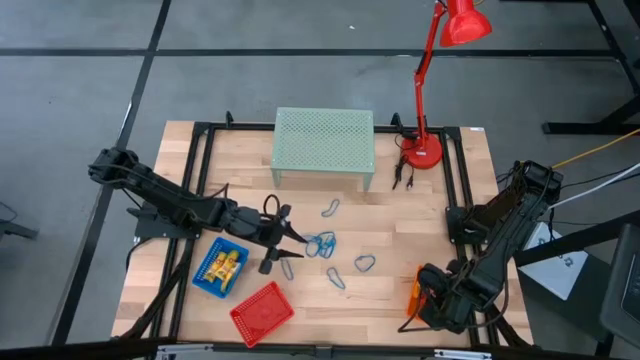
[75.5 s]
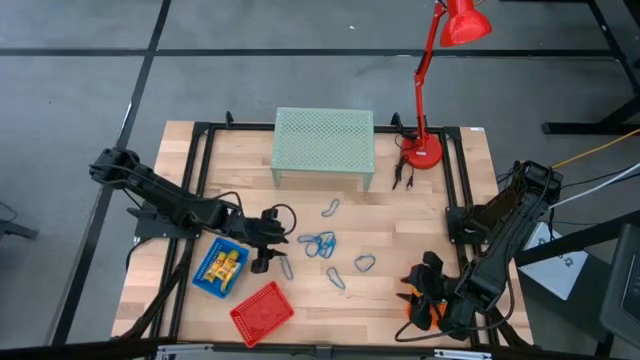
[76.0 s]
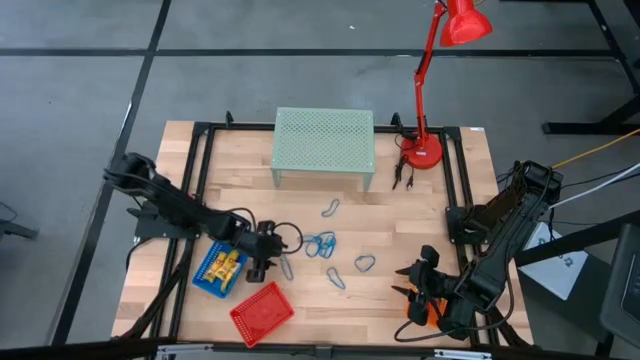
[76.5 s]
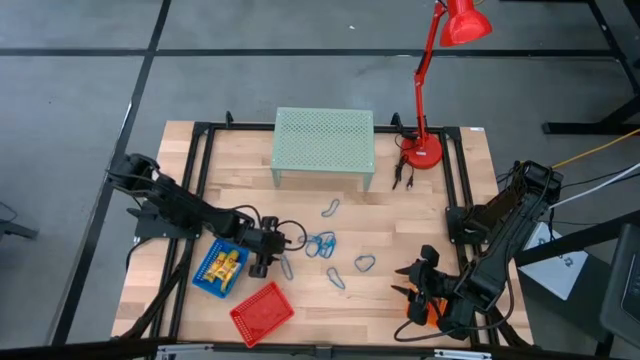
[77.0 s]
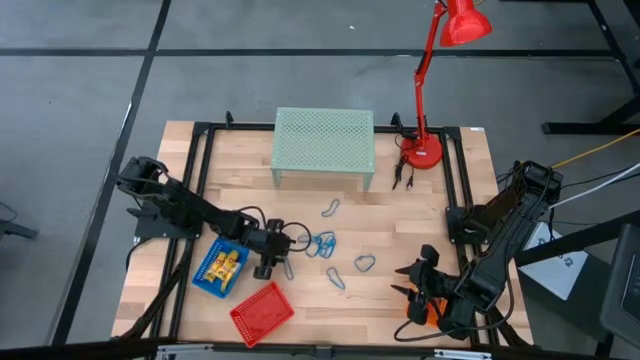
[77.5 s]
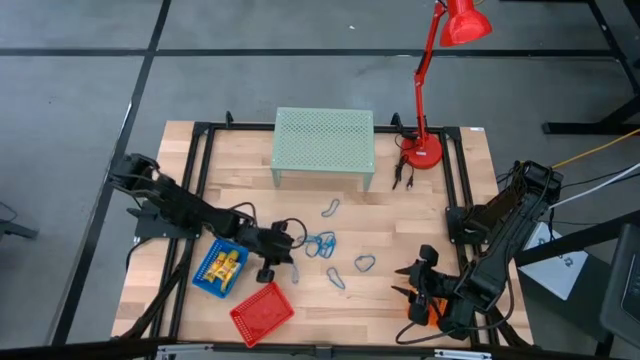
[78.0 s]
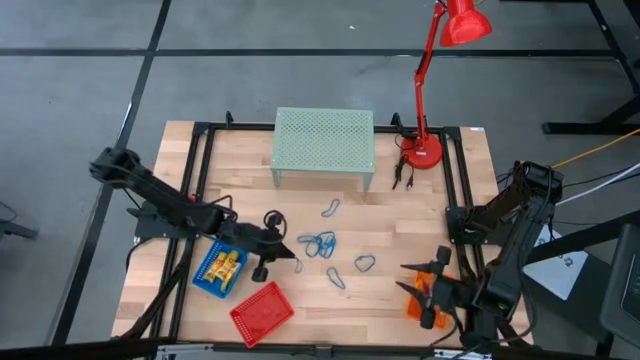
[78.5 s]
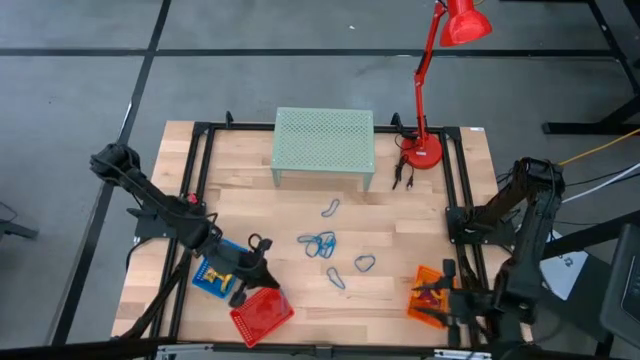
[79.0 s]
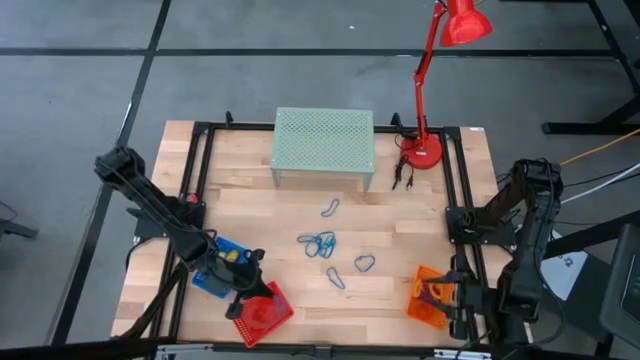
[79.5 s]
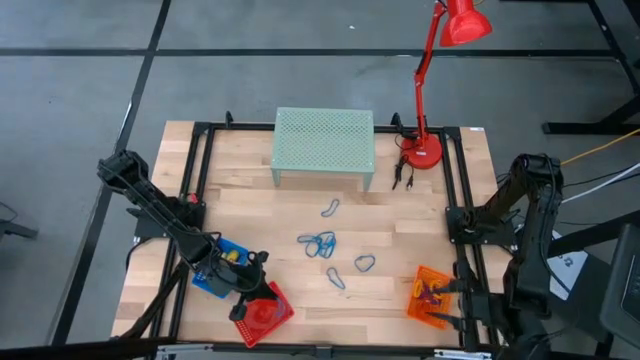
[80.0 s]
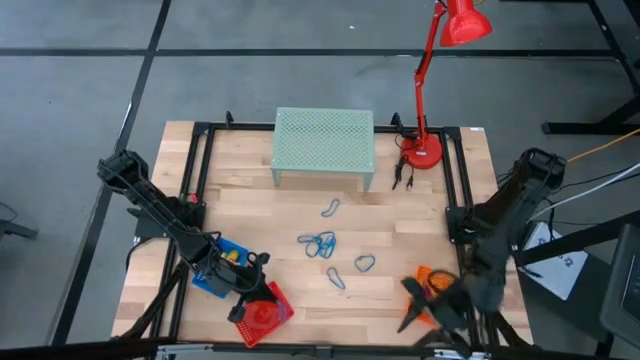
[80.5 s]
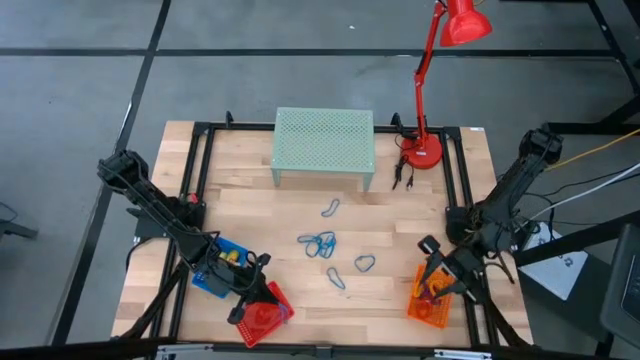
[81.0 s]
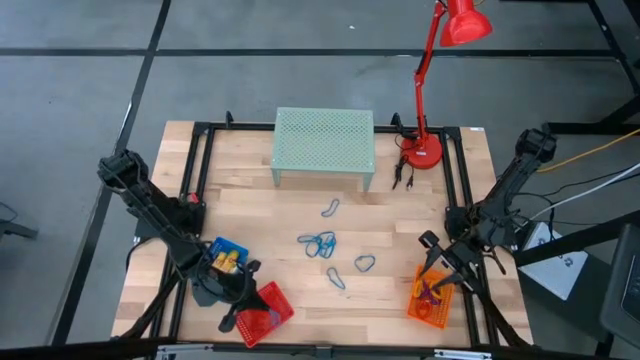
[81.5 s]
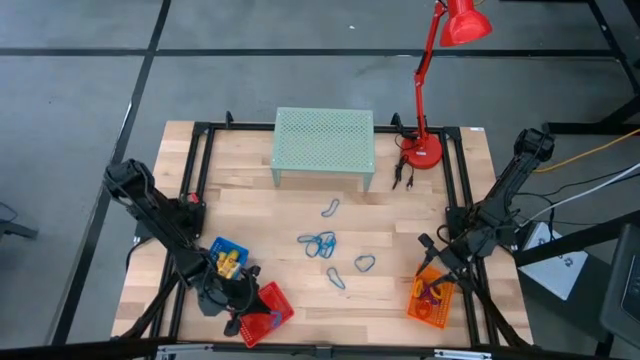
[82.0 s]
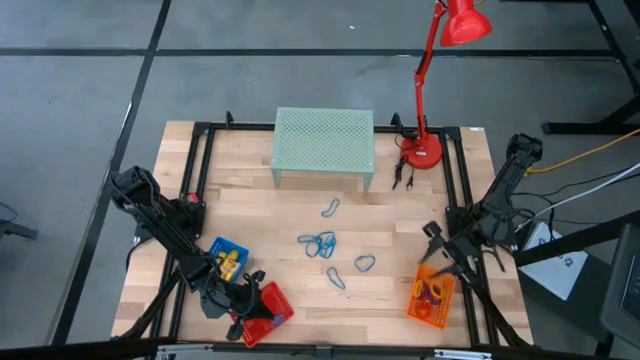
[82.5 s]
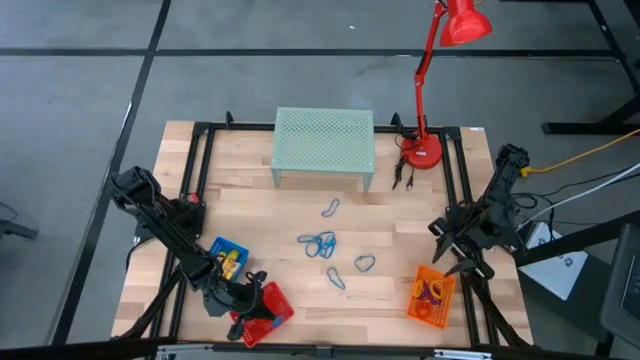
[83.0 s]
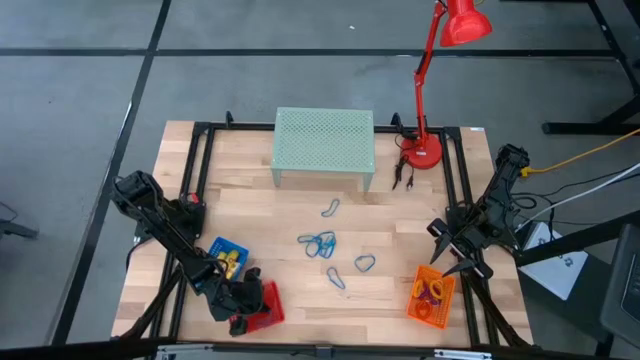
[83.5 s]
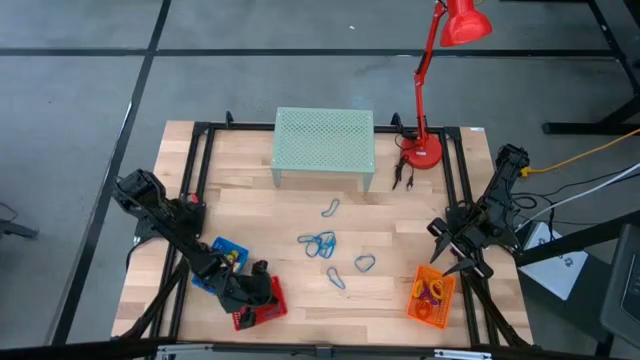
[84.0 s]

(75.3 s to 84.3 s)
Task: Pick & Place Office Desk Supplies
Put the blue rubber band into the red bin

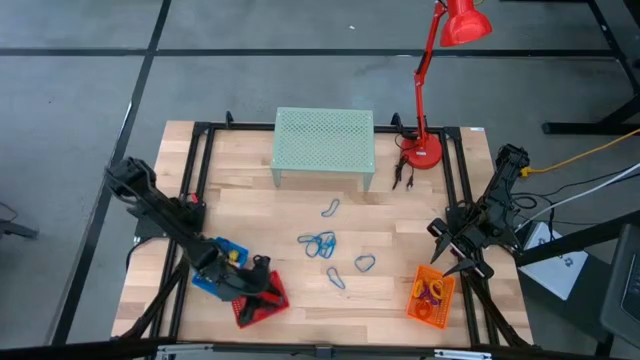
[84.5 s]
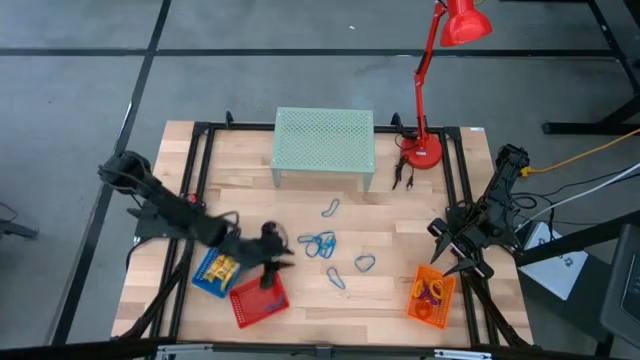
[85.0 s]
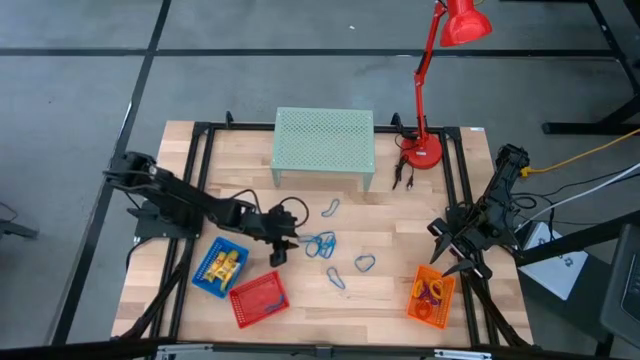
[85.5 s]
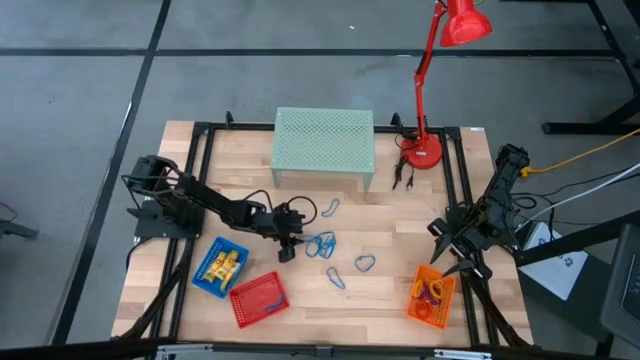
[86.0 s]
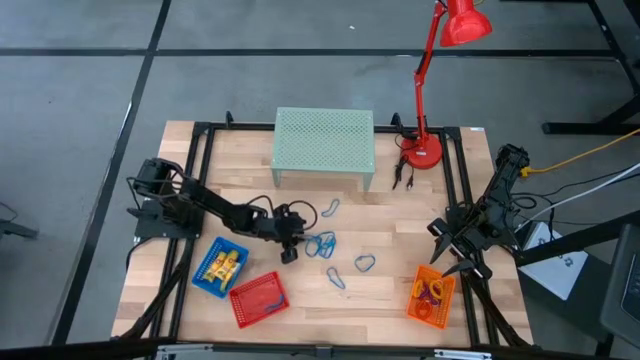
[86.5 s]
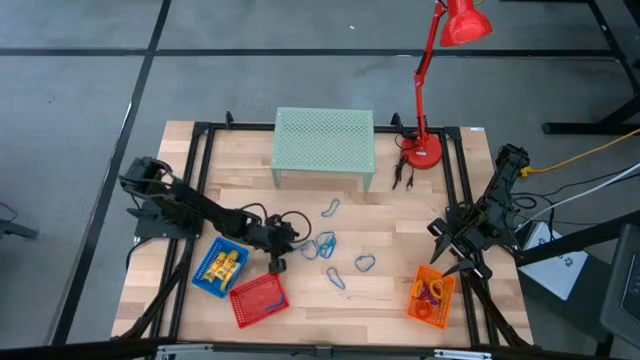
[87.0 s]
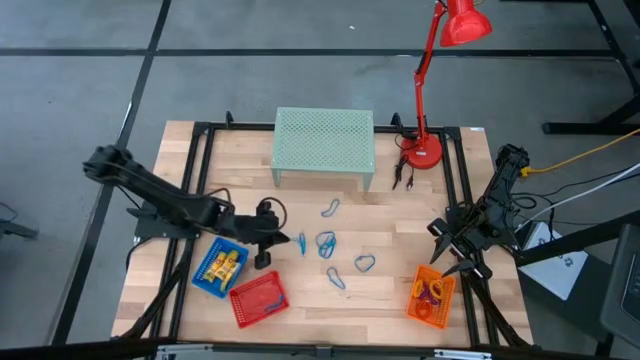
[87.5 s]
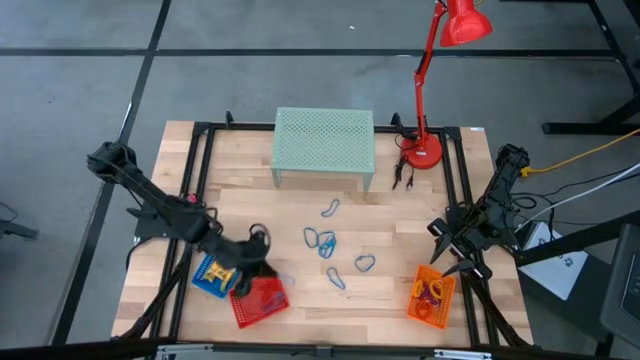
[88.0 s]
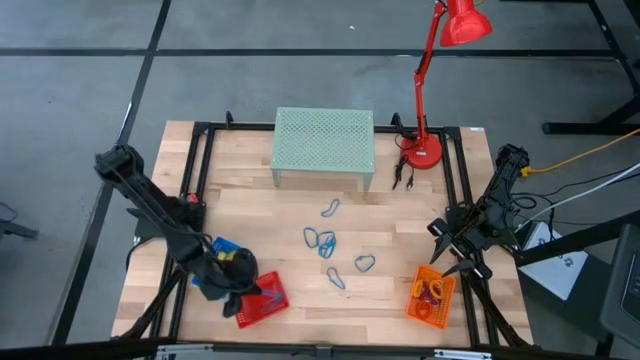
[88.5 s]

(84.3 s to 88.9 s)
Put the blue rubber band into the red bin

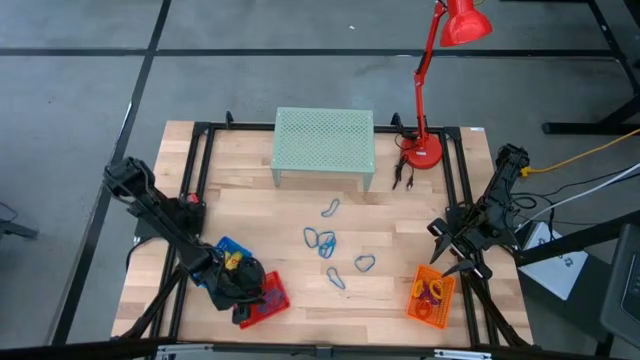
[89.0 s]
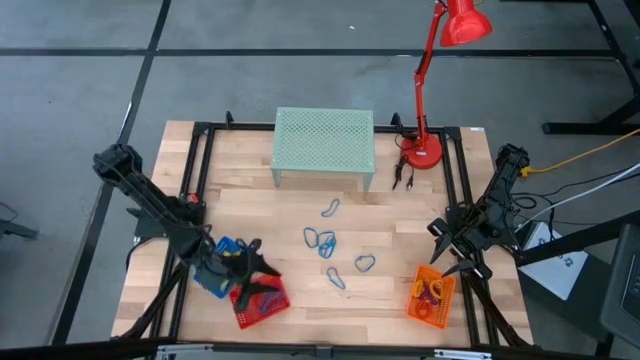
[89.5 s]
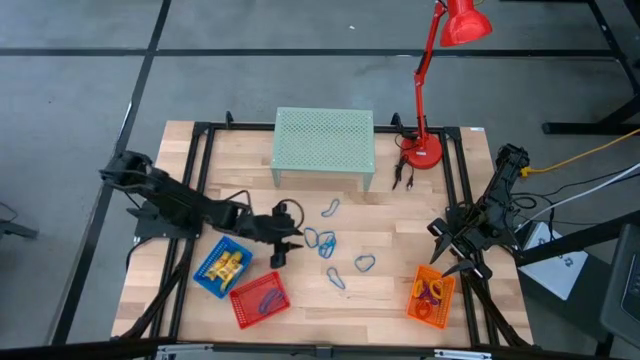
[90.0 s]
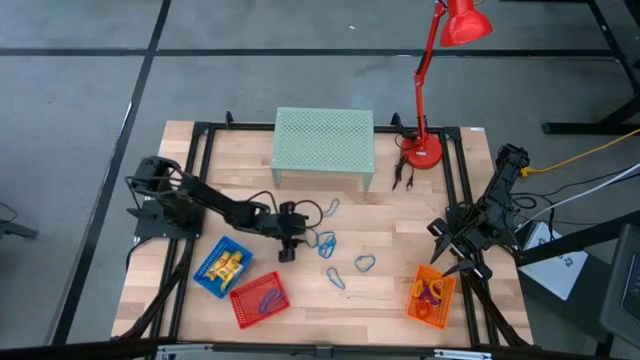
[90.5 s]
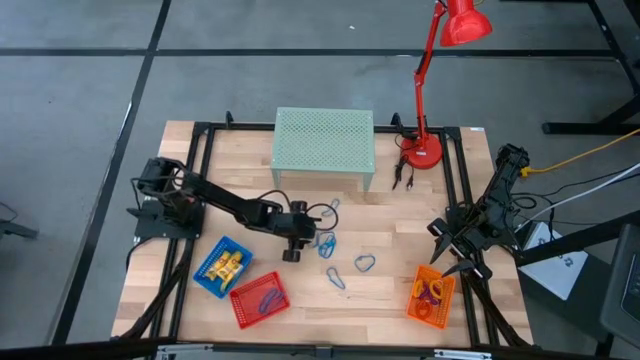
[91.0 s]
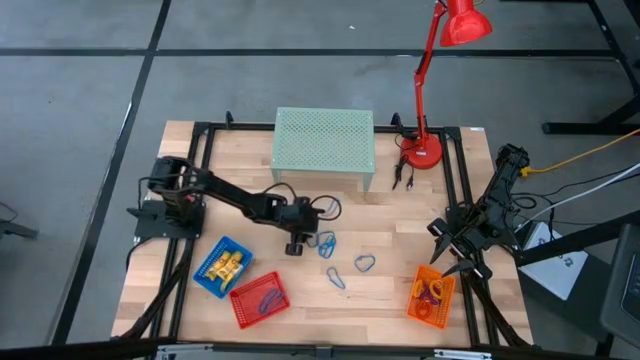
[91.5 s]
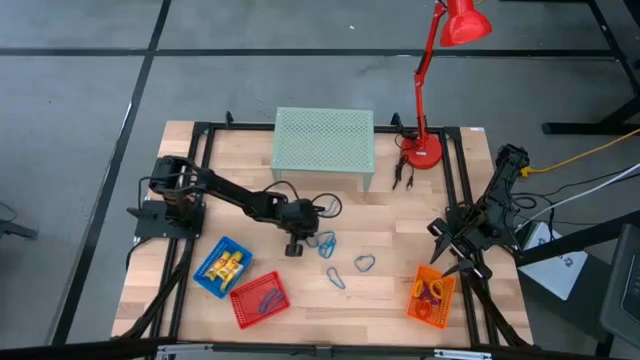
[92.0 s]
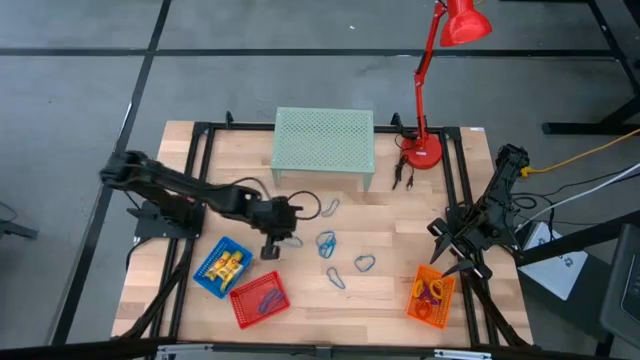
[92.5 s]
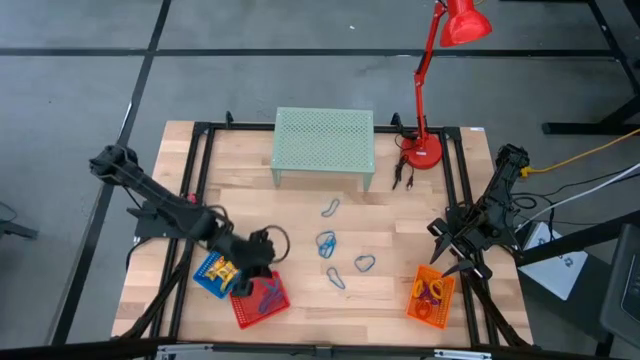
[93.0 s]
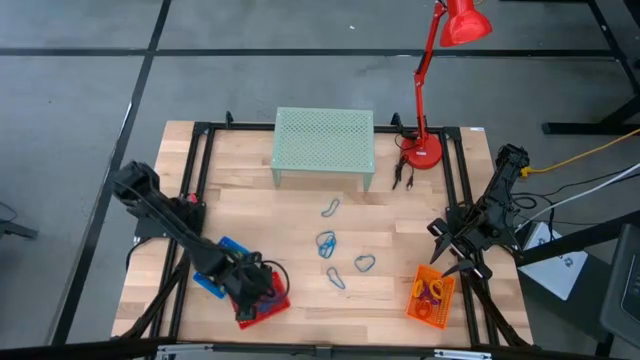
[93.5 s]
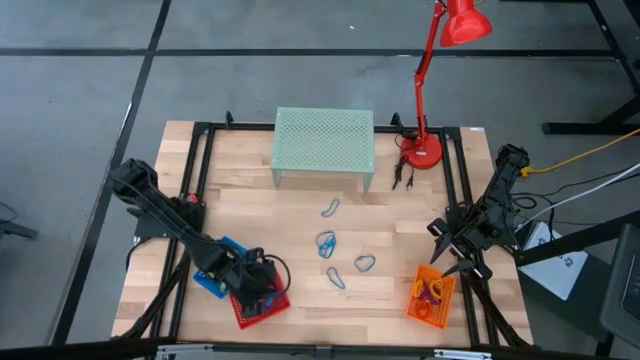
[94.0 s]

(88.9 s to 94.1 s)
Put the blue rubber band into the red bin

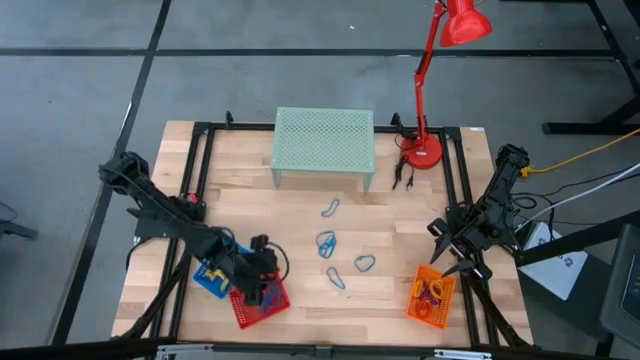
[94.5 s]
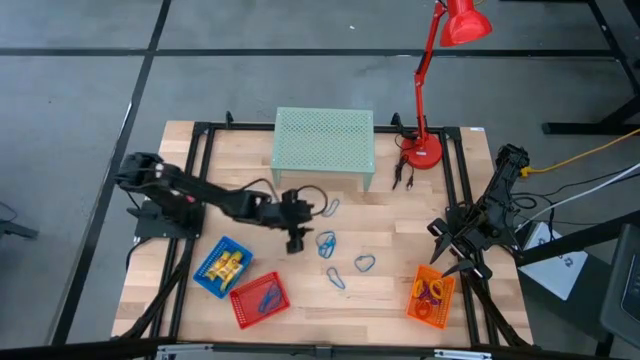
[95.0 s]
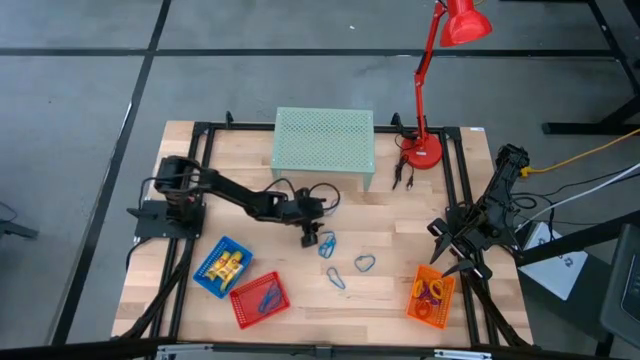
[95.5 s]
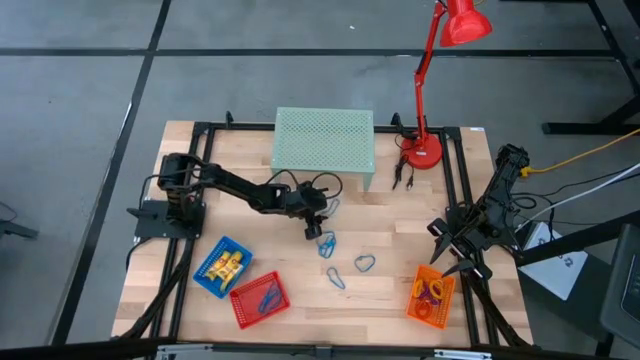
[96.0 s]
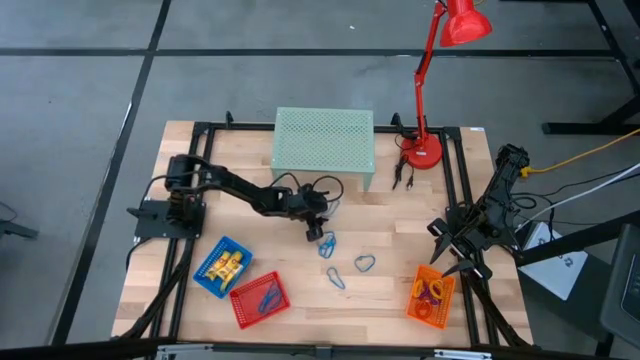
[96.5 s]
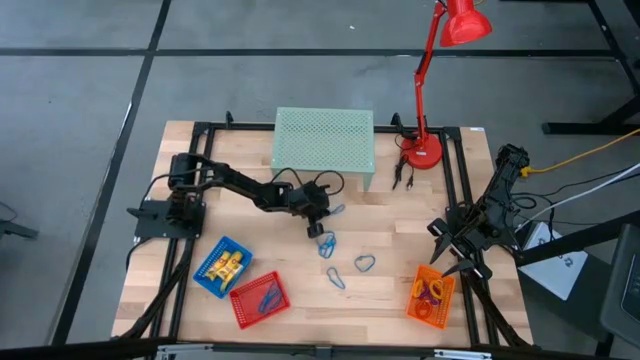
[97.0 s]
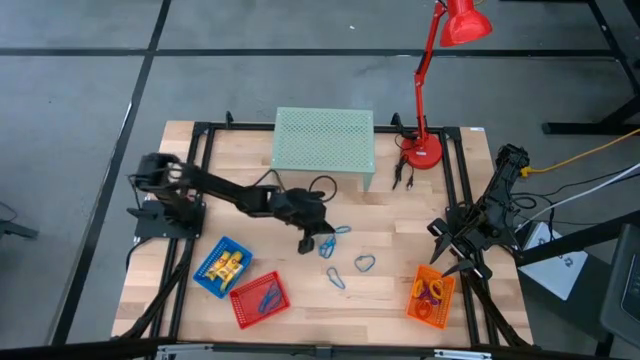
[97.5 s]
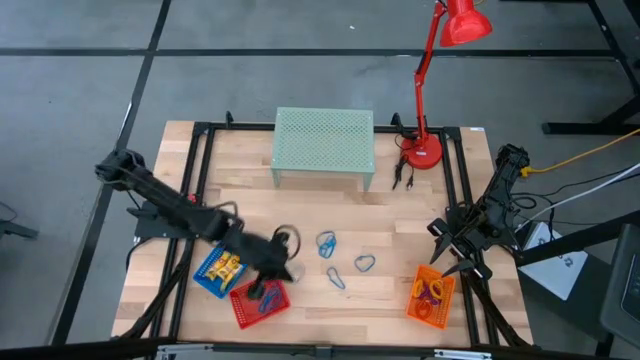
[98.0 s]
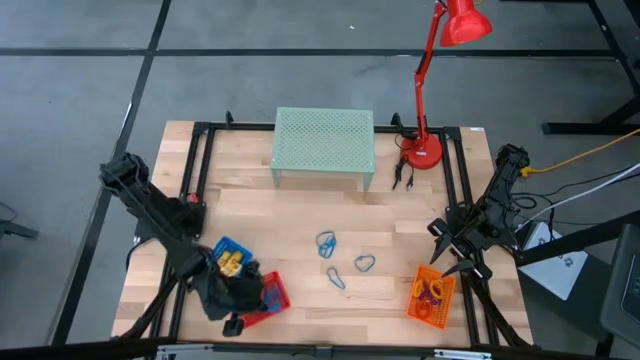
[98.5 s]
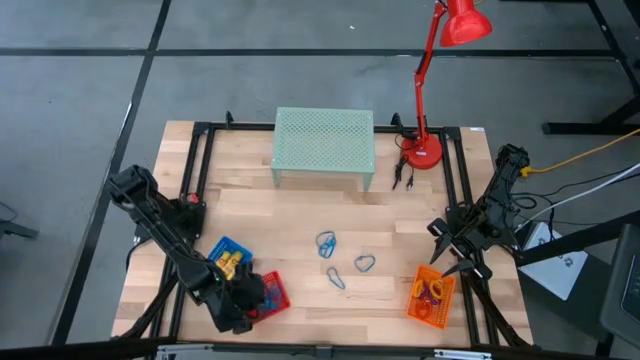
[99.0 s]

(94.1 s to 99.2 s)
Put the blue rubber band into the red bin
